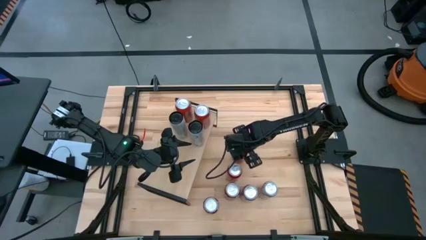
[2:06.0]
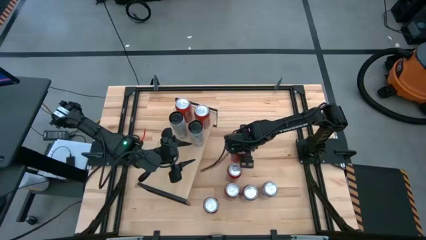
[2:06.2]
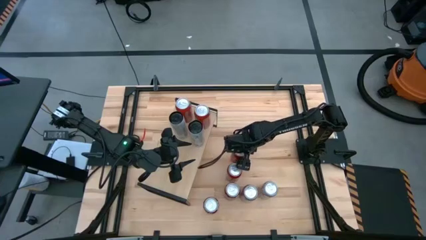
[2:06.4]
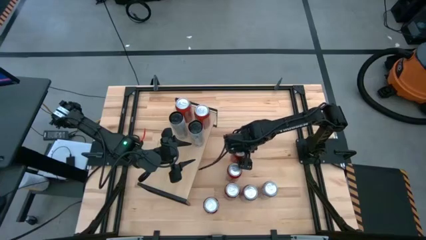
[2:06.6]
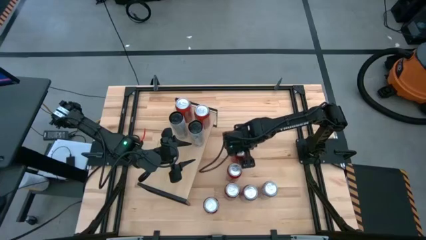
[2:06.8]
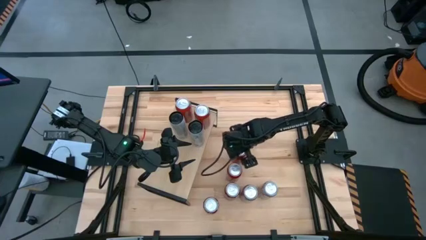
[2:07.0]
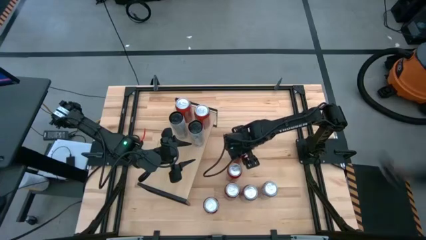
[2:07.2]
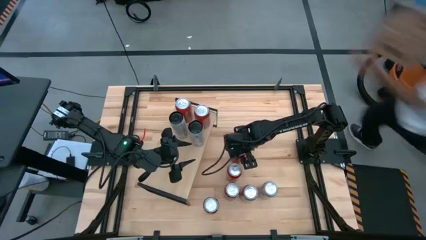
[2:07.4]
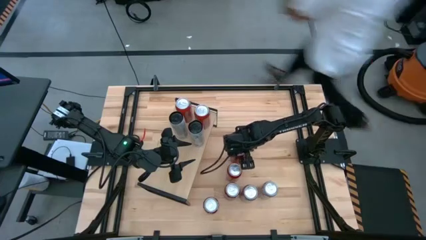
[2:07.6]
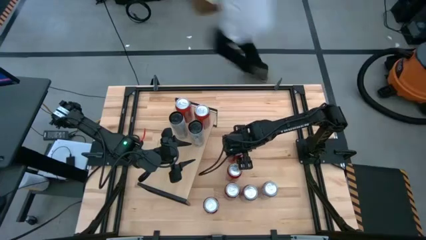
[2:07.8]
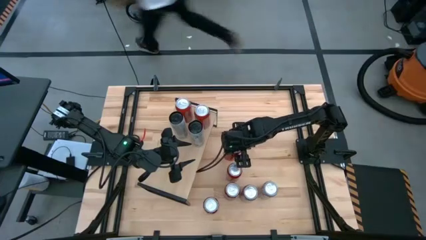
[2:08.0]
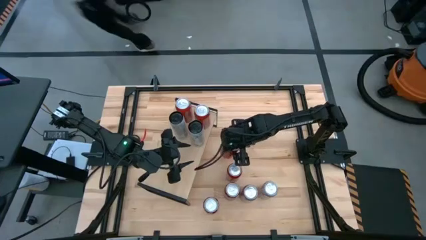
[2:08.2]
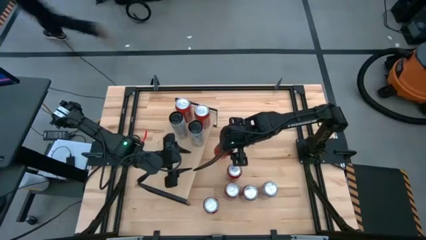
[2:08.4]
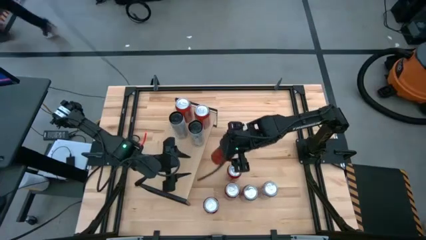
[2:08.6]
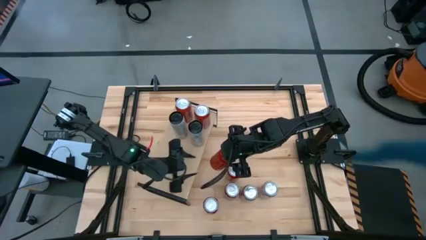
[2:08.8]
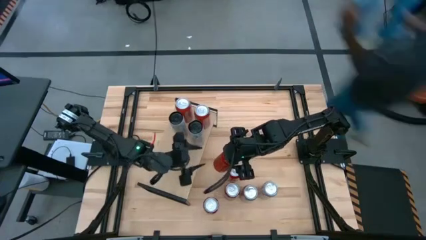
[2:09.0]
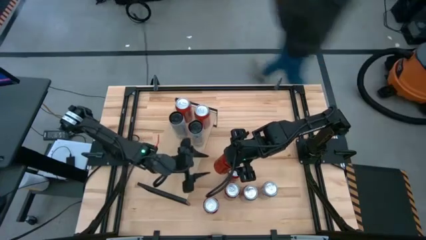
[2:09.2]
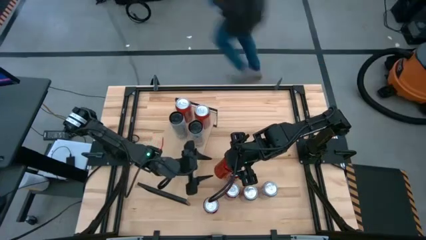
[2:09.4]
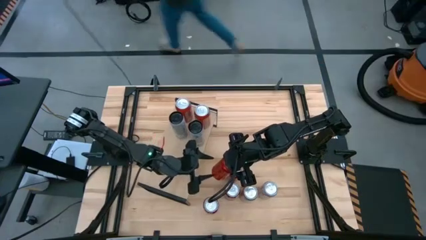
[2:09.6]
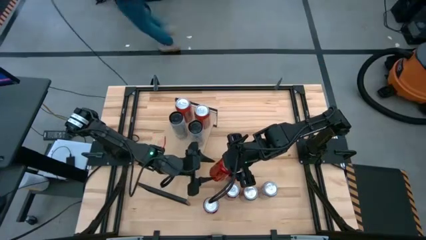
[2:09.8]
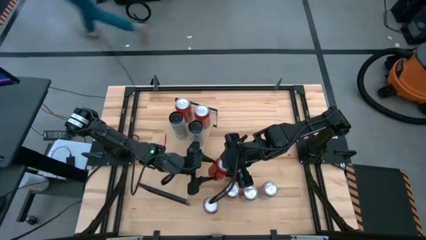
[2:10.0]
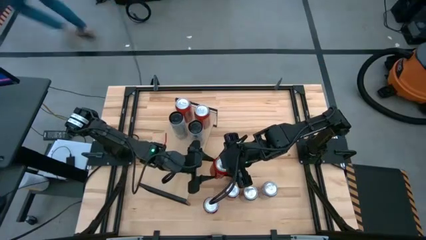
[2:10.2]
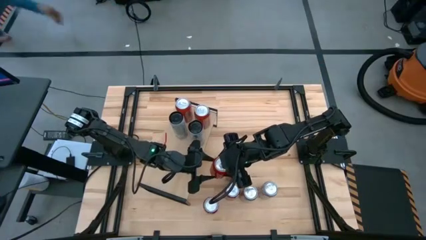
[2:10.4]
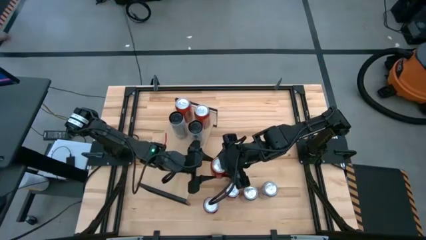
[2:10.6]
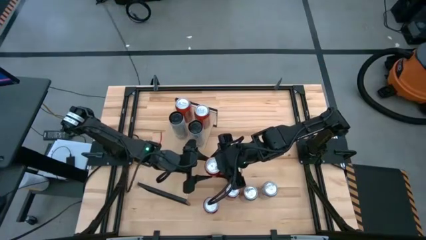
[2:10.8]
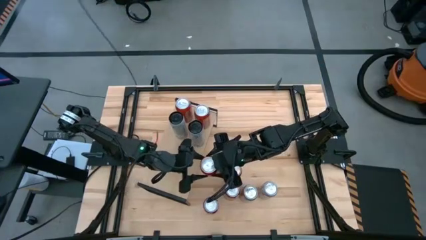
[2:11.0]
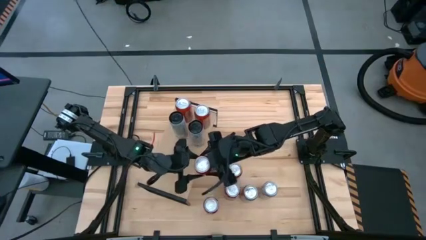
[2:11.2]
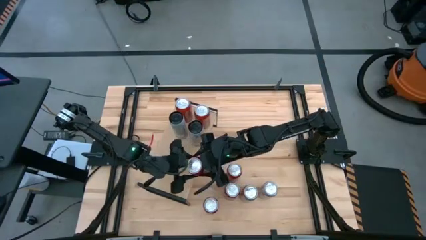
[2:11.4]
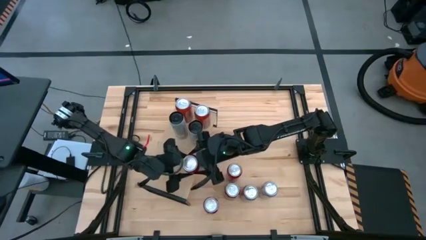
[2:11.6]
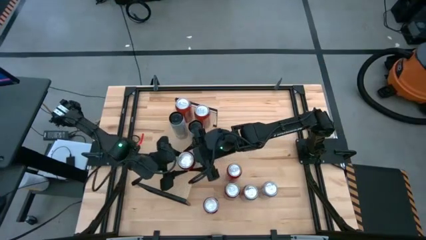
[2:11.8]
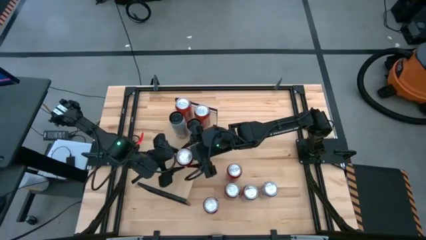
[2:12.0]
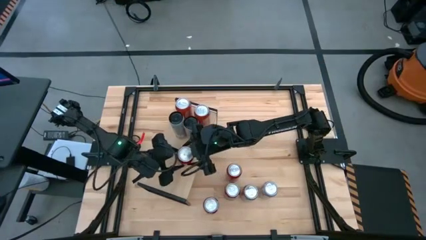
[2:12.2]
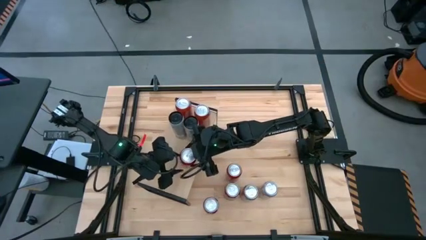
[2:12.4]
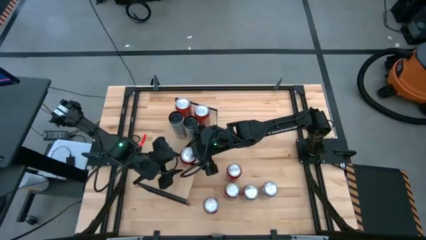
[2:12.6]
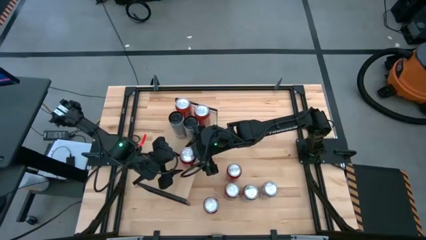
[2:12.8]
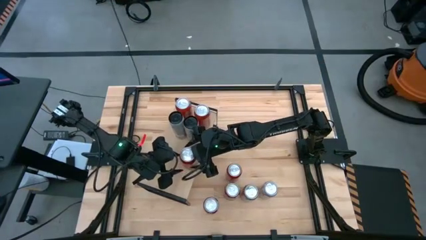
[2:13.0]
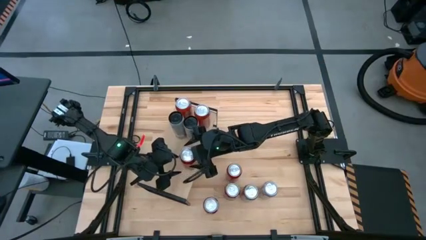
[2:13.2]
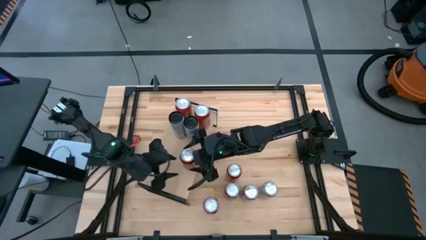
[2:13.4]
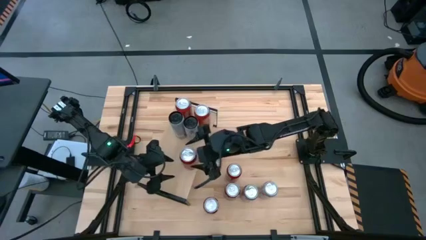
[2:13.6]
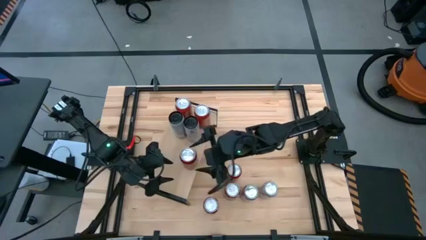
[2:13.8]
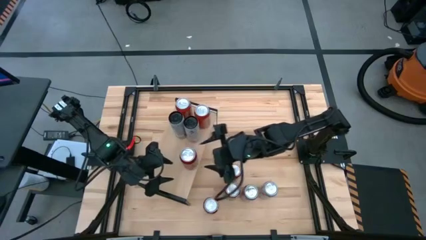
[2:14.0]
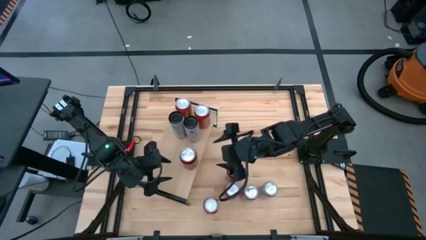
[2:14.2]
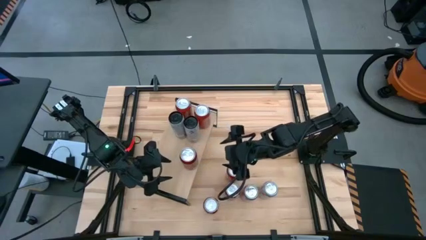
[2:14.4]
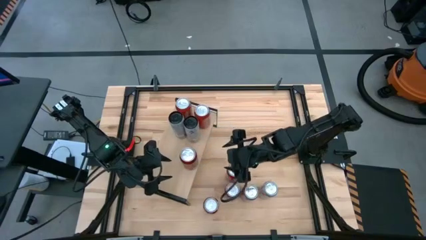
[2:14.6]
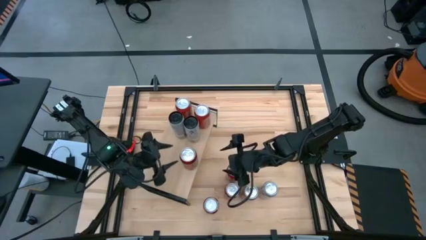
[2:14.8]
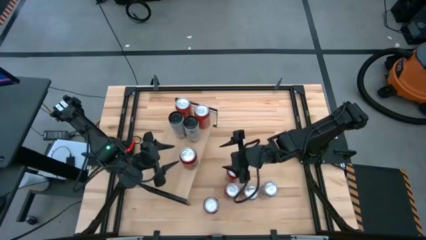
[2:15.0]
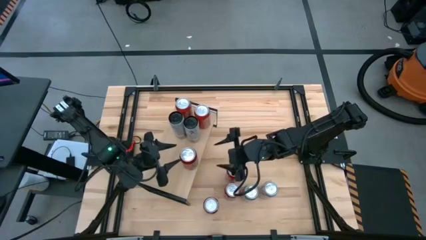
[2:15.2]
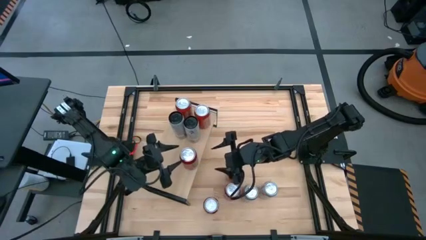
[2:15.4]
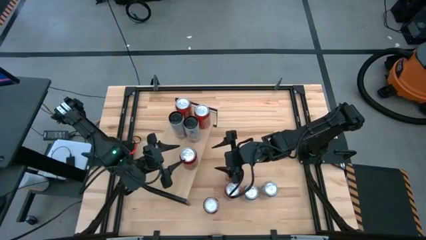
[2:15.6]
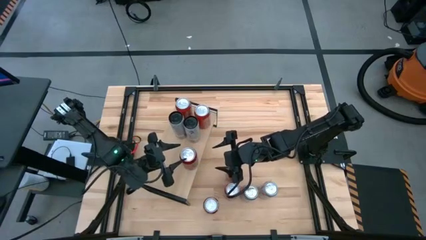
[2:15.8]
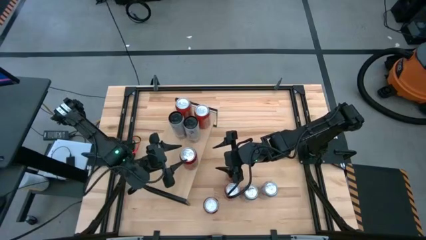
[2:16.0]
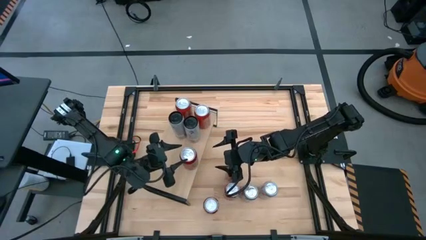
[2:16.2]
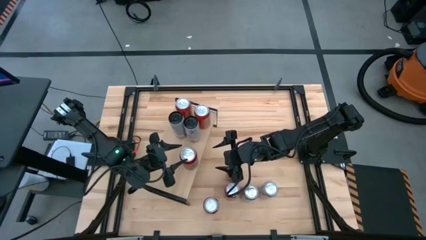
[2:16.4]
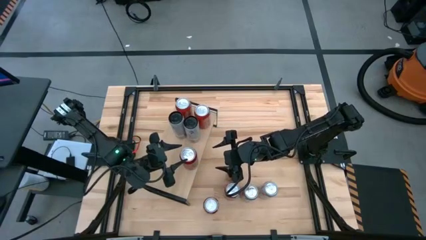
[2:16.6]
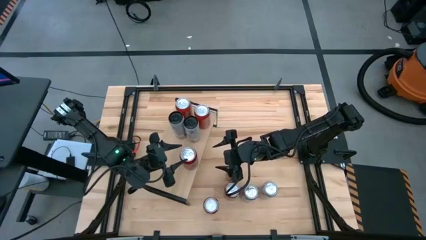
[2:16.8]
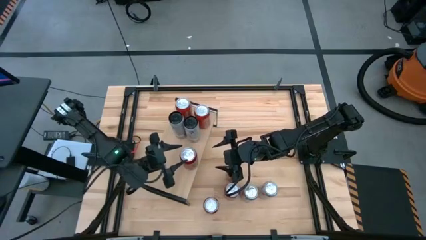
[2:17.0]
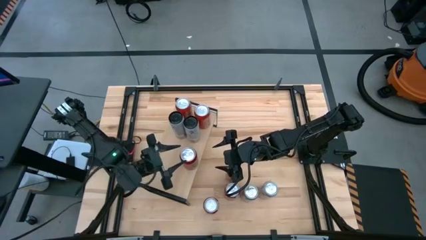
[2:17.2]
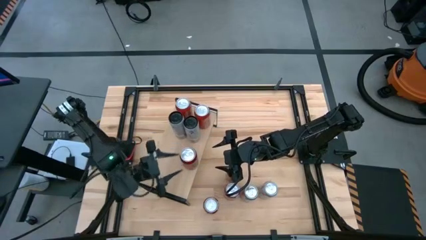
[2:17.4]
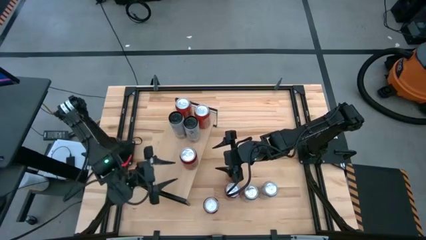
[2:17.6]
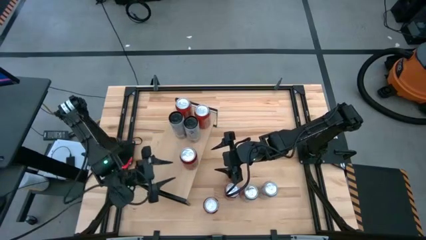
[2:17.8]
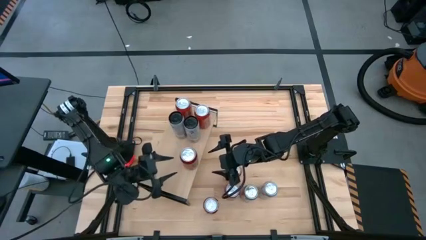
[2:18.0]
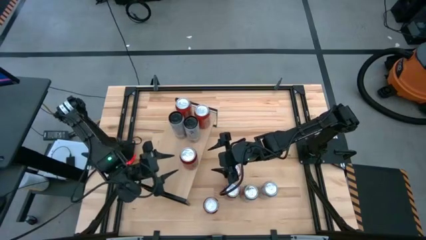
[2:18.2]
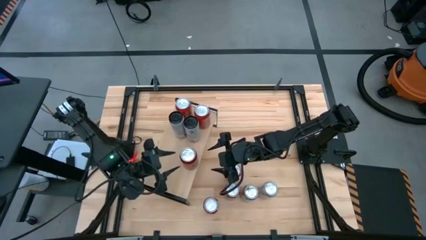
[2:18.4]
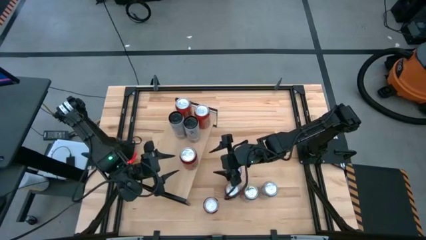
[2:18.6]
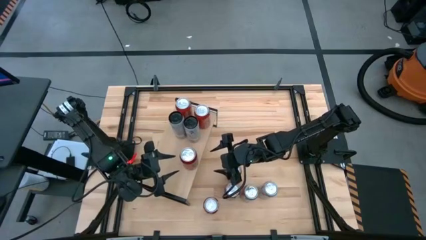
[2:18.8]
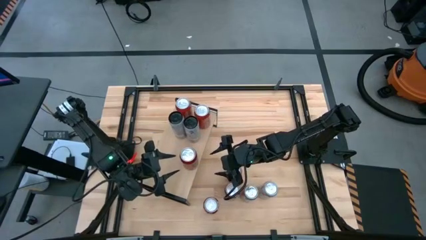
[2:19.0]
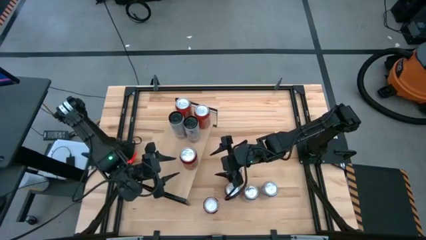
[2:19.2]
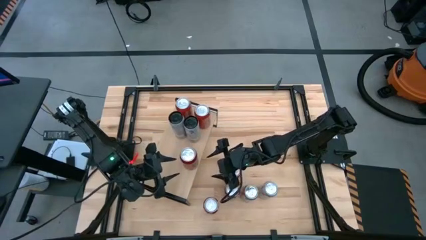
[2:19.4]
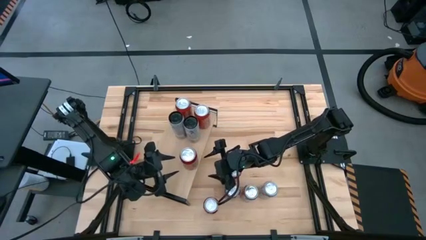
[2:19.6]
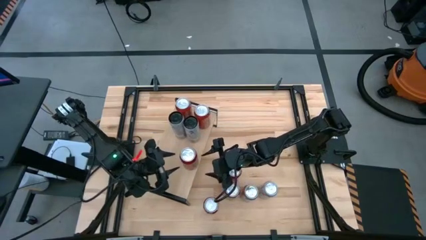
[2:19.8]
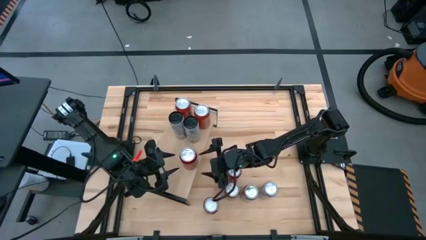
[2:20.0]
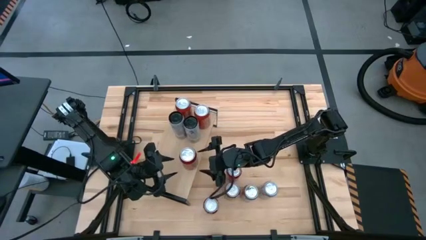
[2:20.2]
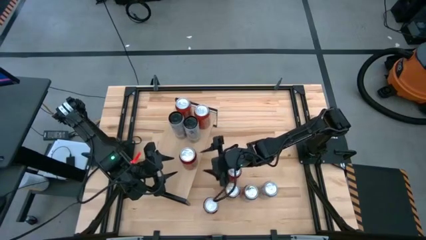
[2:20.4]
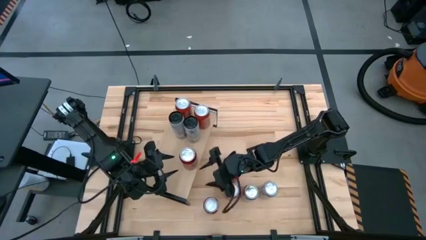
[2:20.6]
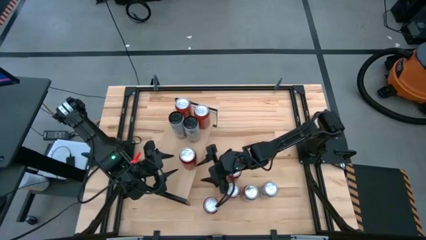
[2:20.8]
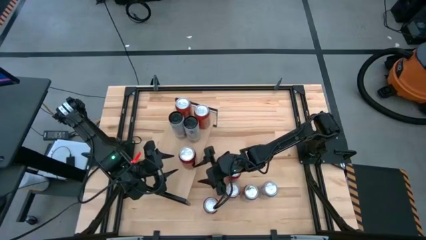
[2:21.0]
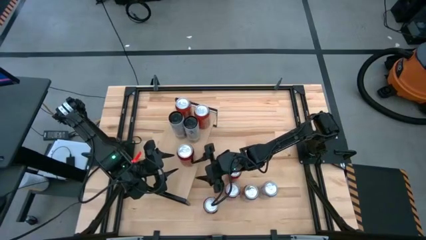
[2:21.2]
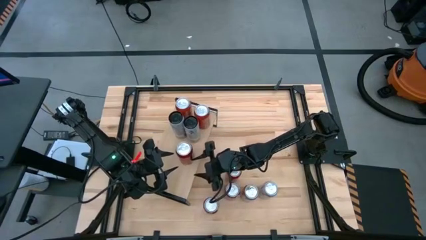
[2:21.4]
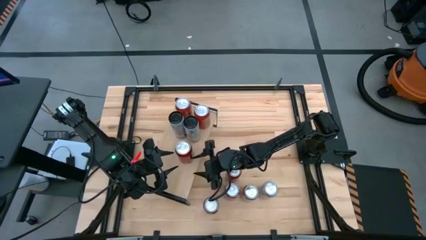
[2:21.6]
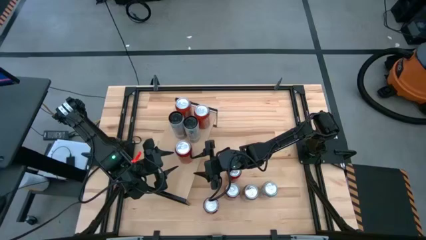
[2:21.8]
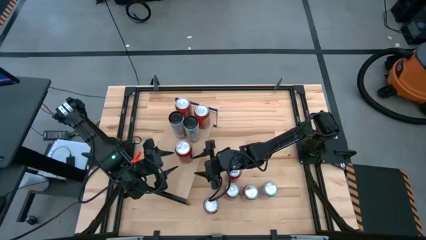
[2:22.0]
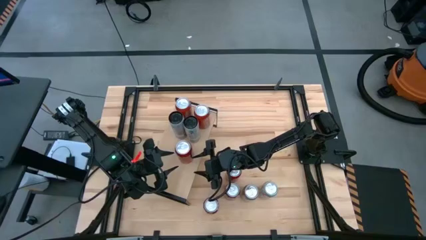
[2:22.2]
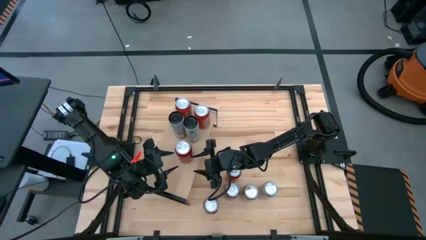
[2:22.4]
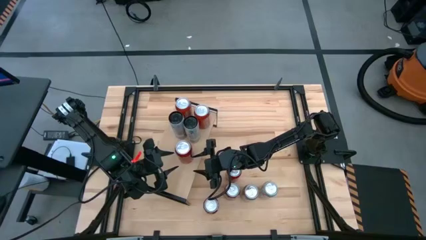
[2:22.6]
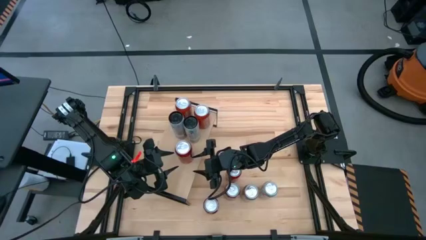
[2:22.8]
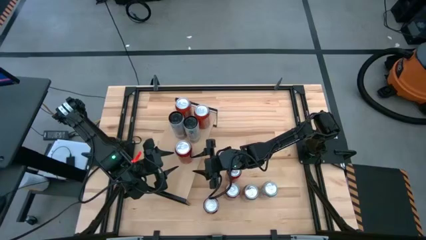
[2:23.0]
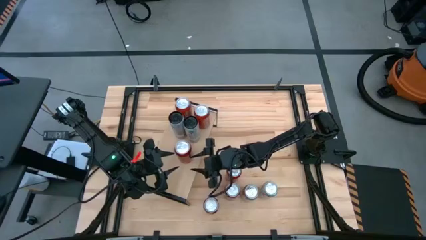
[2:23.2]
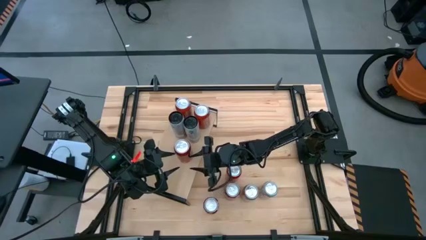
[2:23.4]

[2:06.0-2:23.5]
Task: Place canned beverage on shelf
Put the top red soda can on the shelf
